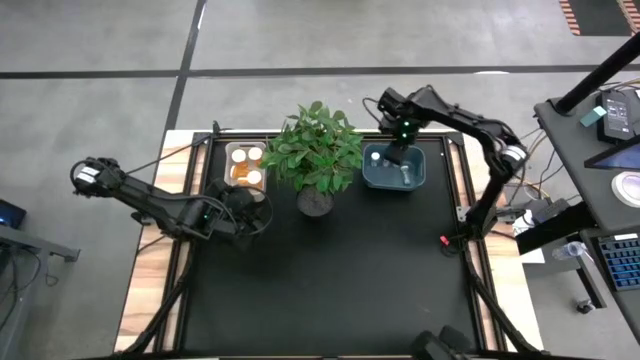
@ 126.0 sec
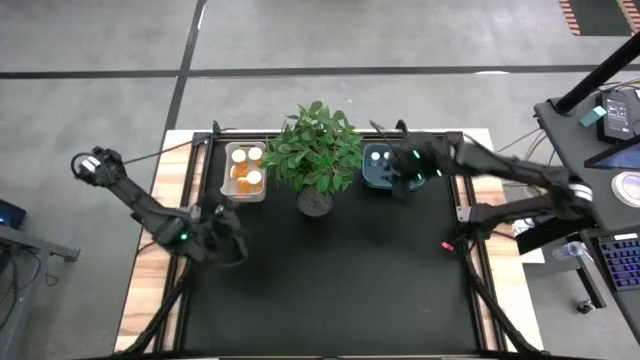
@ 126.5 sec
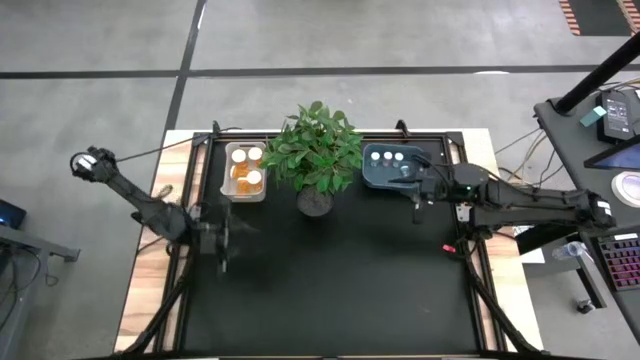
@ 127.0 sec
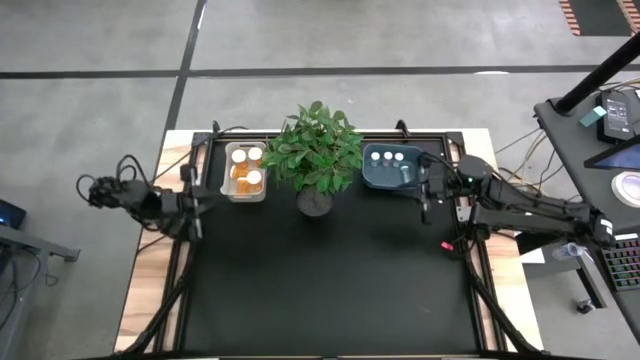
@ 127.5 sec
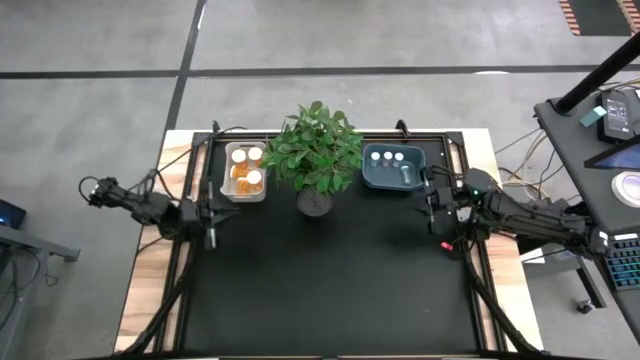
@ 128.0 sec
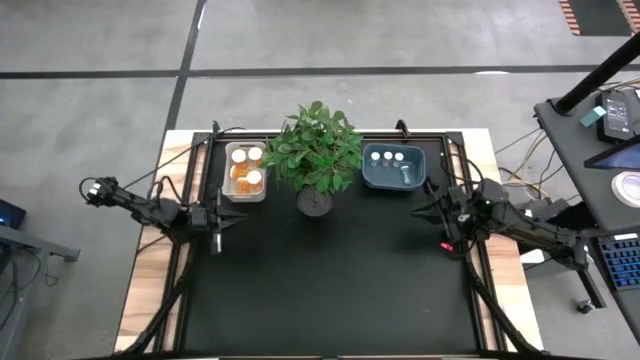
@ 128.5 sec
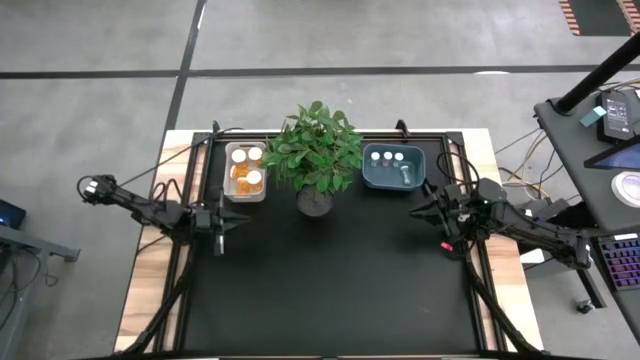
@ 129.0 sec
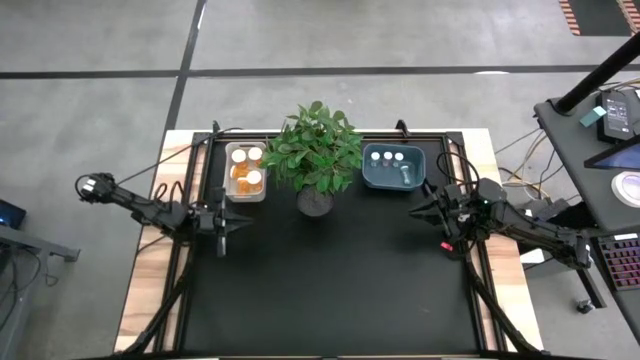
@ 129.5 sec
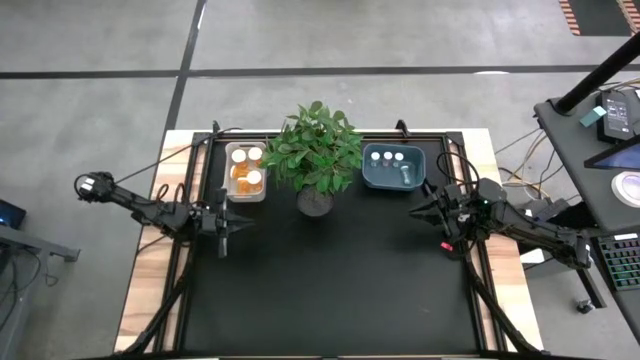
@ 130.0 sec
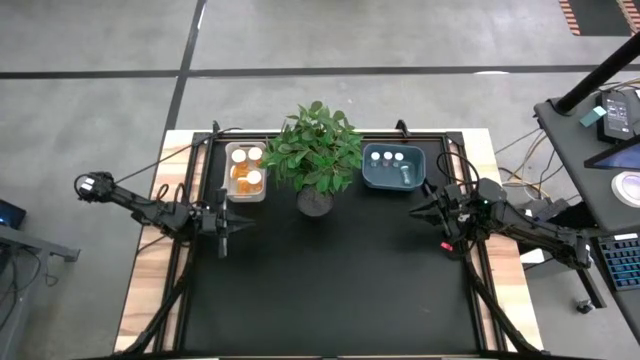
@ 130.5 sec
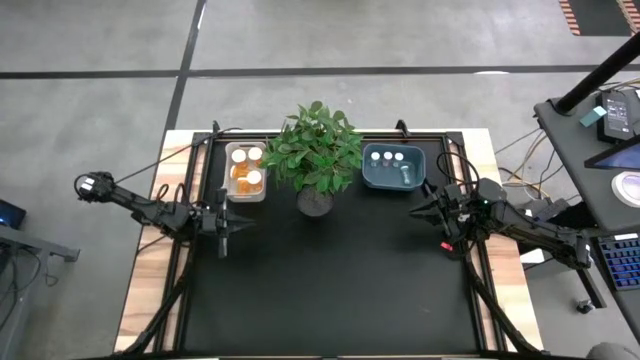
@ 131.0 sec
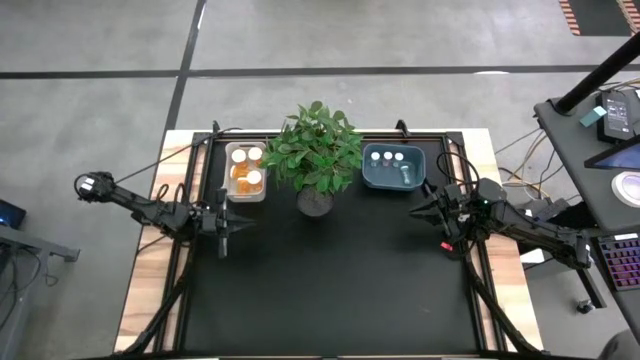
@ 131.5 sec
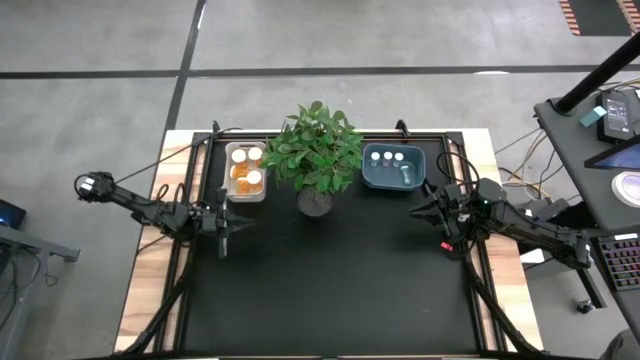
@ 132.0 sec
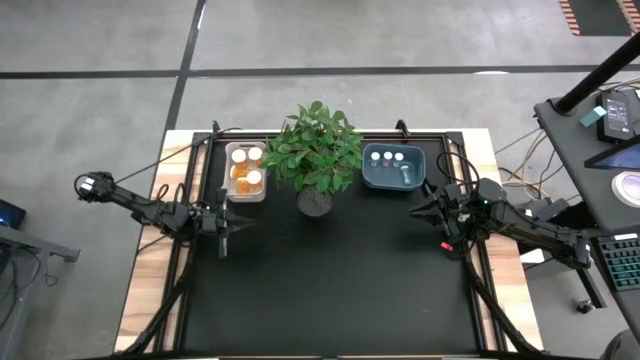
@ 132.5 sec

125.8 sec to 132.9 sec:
Task: Pick and place medicine bottles into bin by pill shape (circle, oval)
Return to Home Position

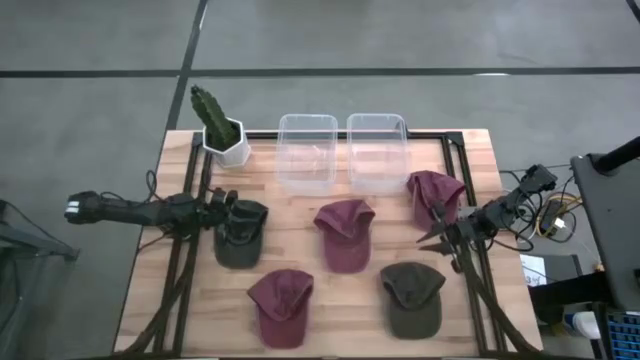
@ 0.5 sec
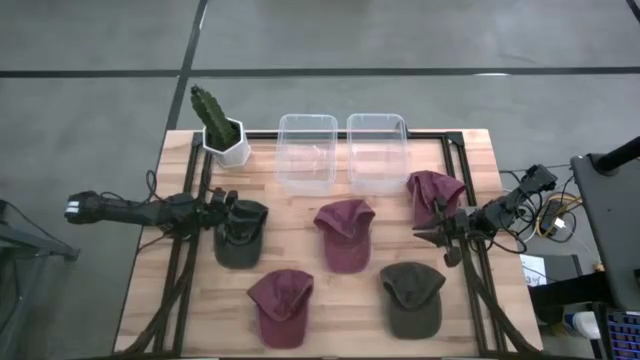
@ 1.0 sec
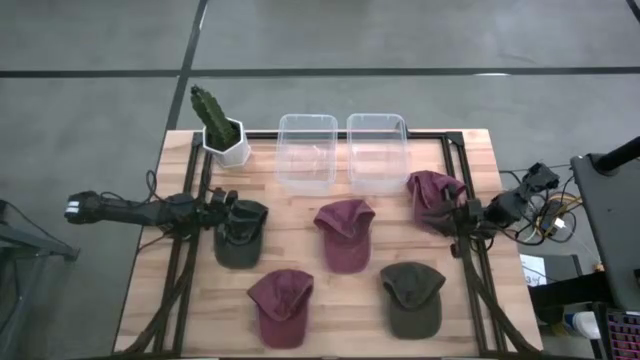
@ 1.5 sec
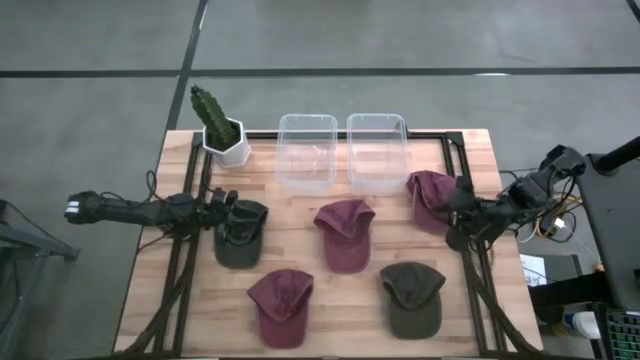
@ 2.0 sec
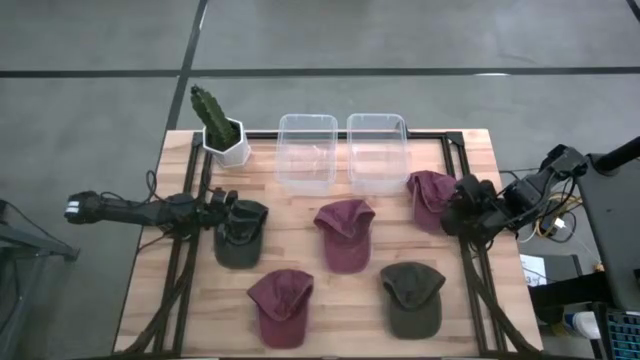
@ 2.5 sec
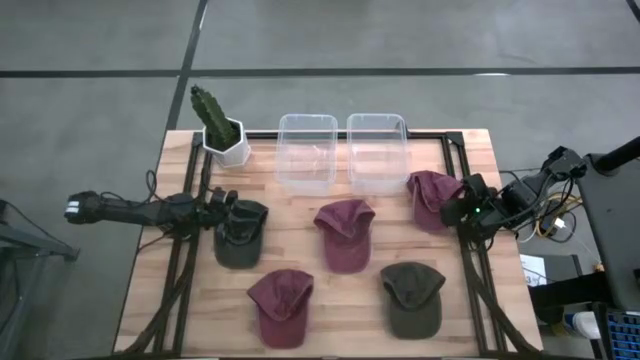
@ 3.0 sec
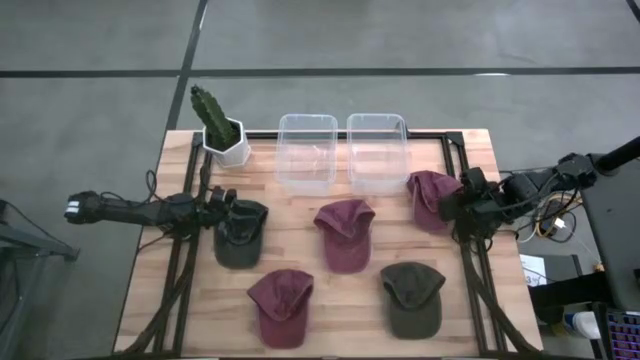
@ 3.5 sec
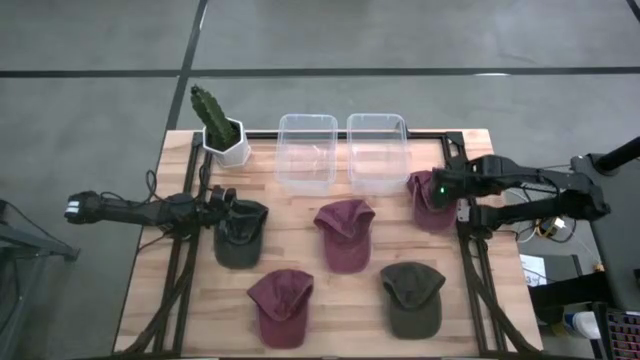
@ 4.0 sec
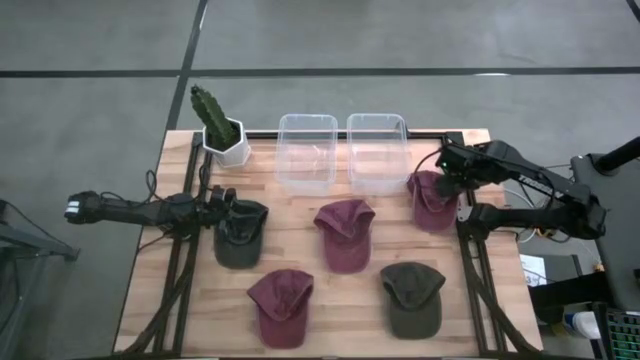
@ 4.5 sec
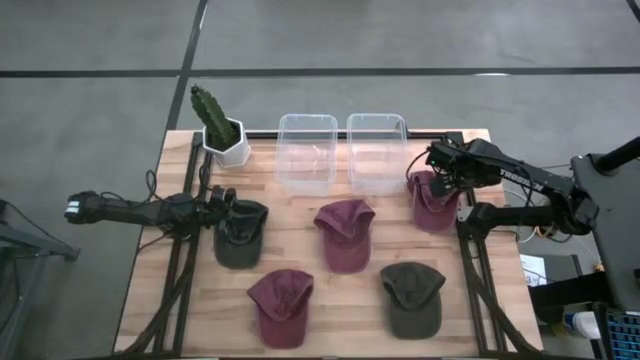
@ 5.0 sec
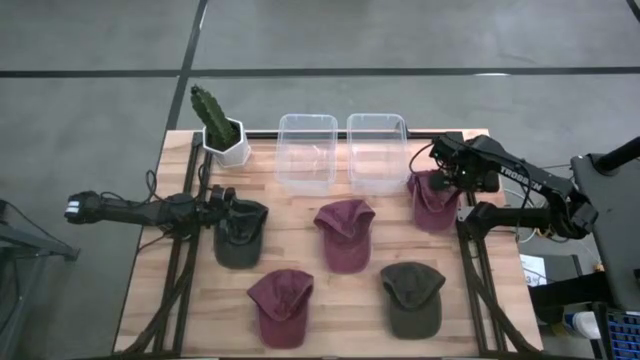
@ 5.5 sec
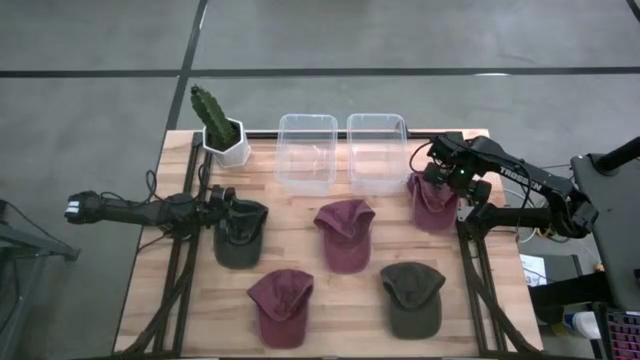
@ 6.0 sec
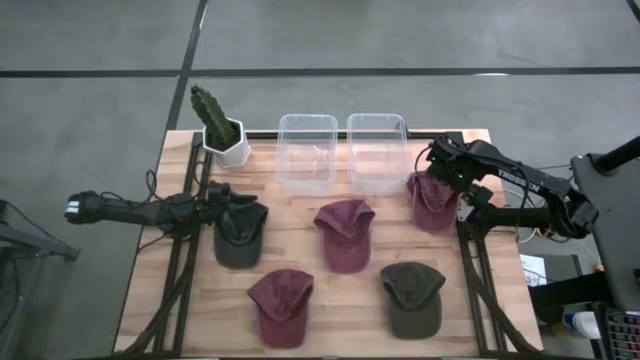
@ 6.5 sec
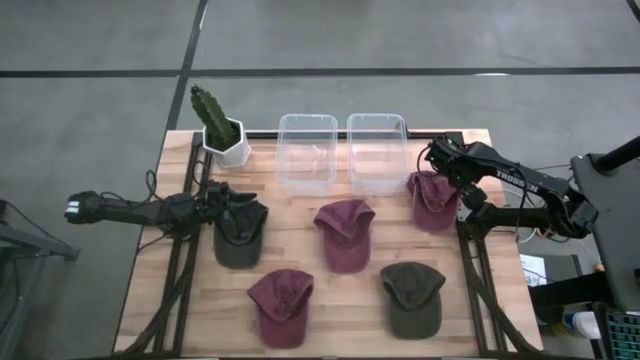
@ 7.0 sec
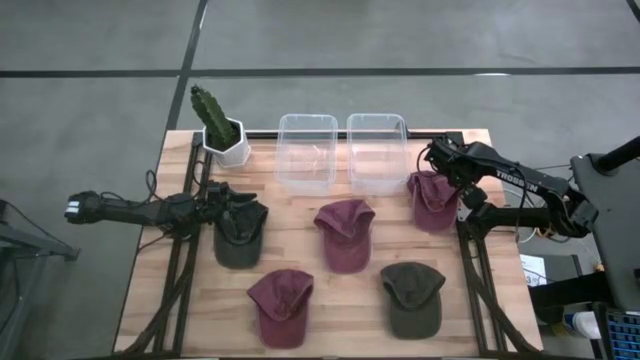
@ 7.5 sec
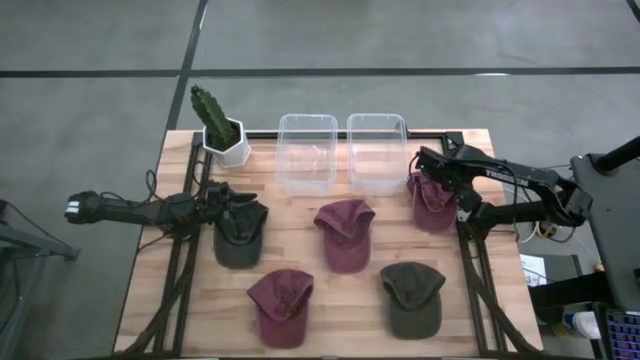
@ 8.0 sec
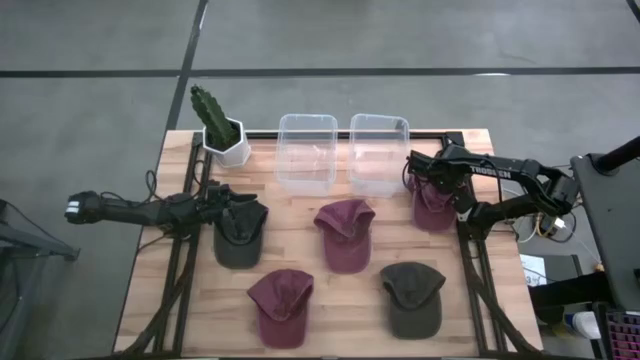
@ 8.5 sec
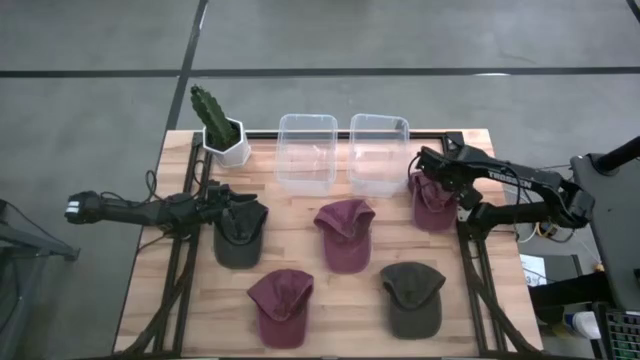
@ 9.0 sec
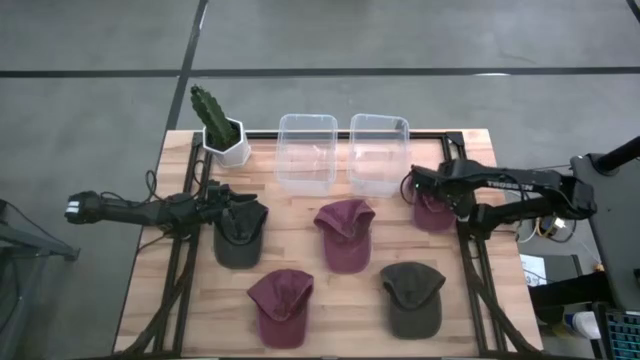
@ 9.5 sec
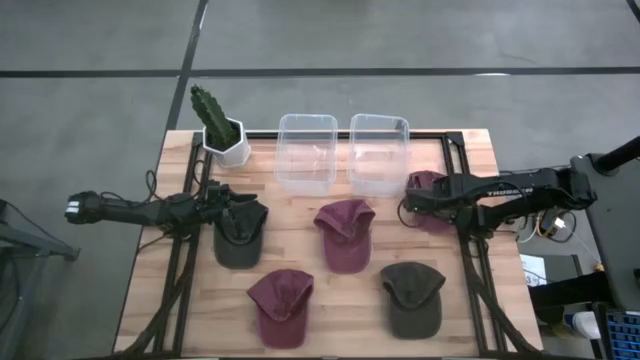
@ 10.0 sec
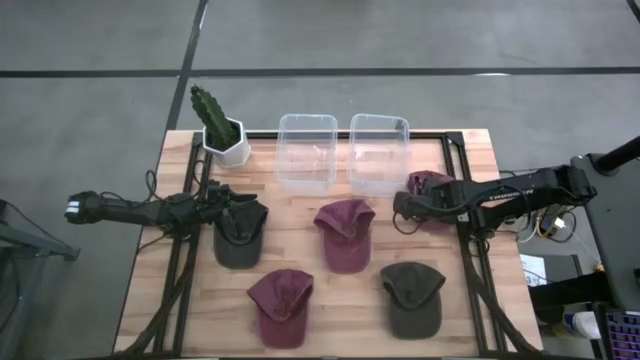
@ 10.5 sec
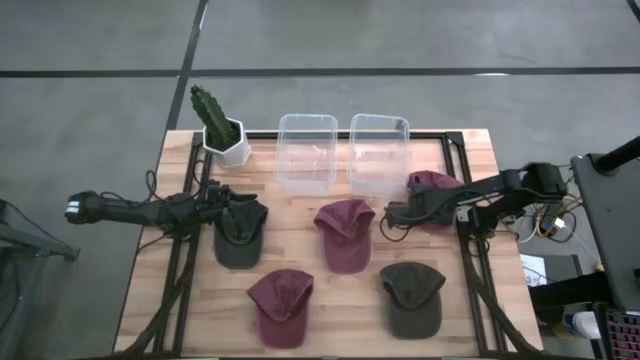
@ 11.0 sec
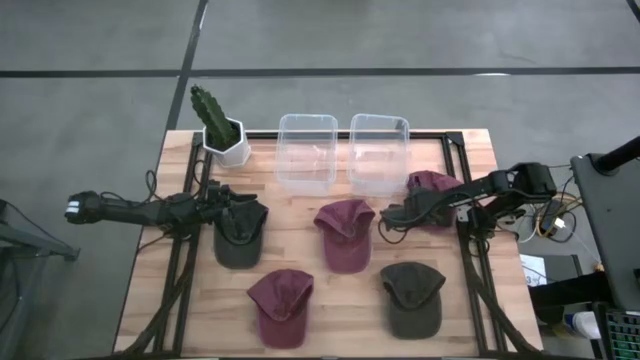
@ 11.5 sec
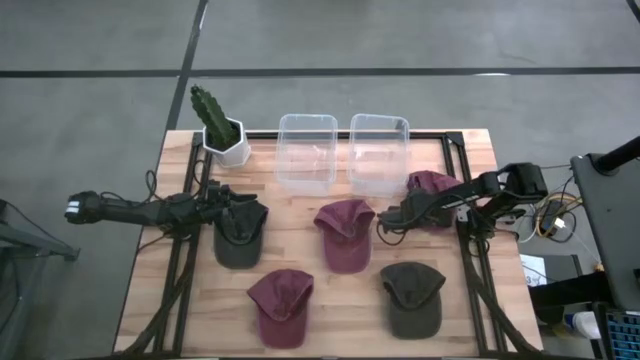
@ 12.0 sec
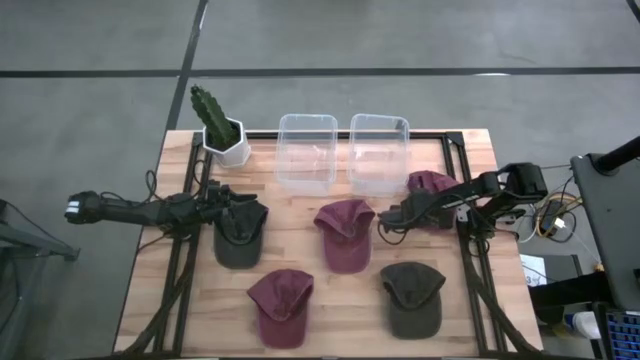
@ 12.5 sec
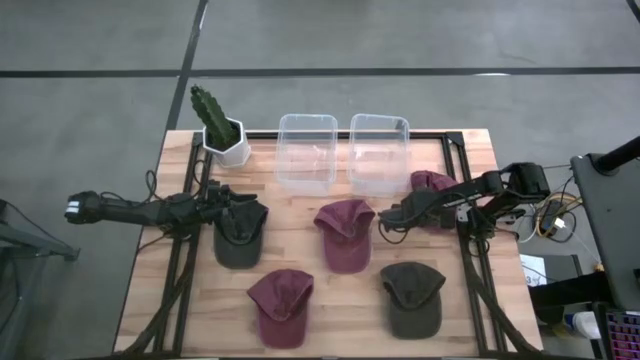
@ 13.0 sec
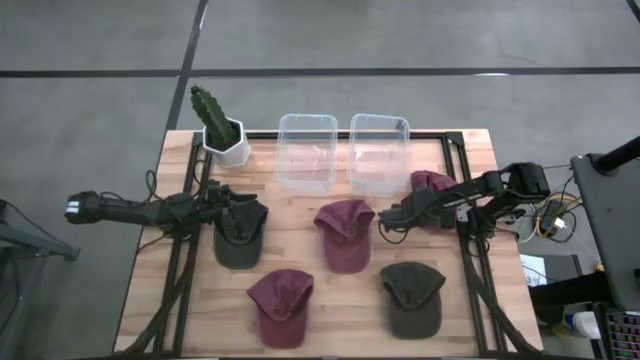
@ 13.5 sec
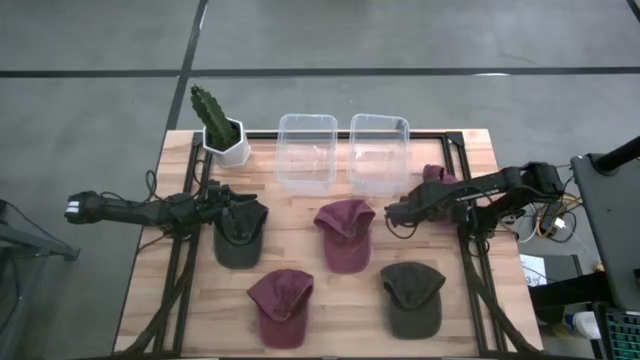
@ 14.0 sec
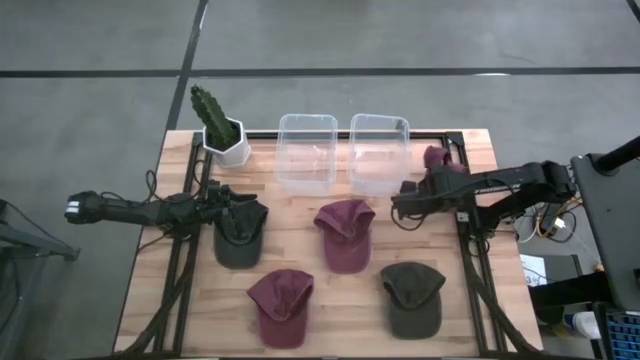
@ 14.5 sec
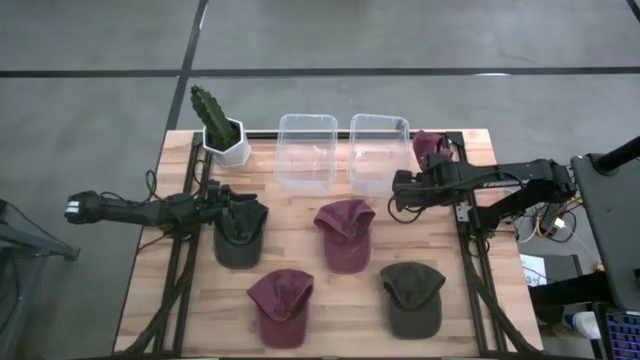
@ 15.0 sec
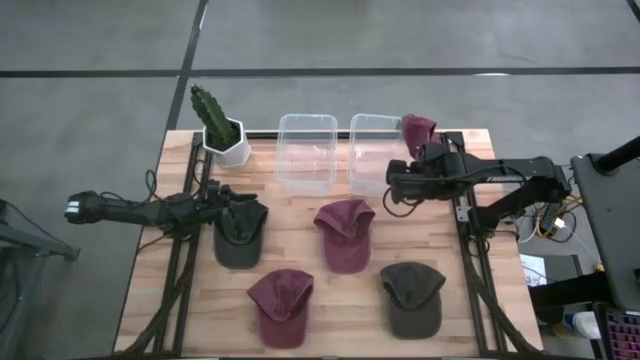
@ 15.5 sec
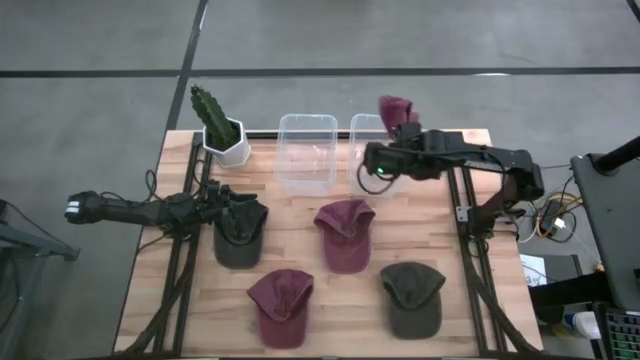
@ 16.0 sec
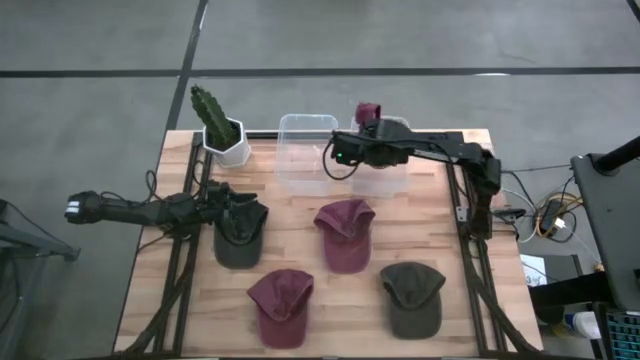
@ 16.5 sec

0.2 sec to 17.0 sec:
Task: Pick & Place hat
Put the right red cap into the right transparent bin
